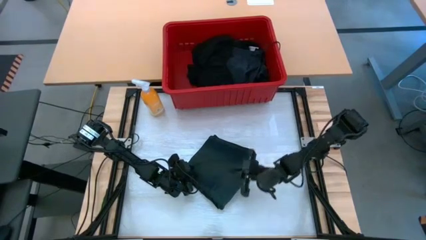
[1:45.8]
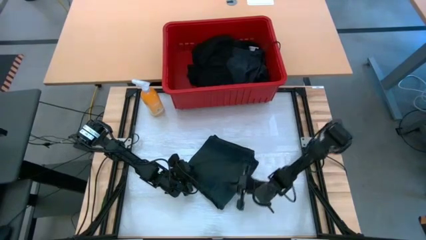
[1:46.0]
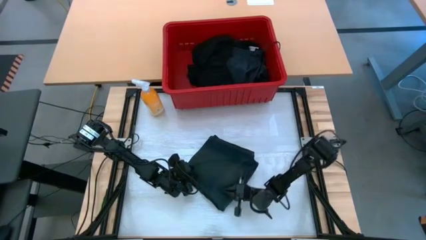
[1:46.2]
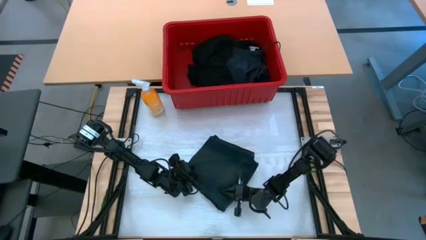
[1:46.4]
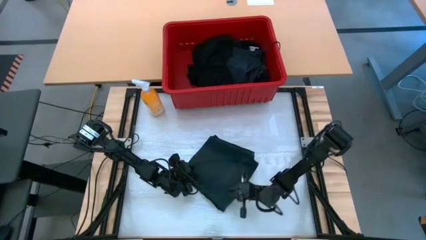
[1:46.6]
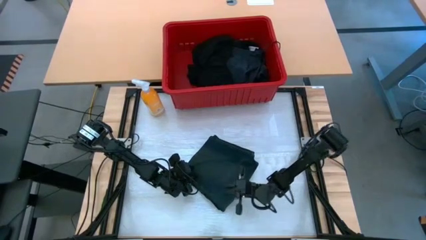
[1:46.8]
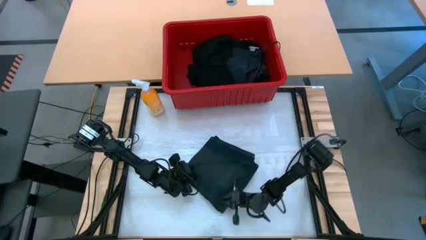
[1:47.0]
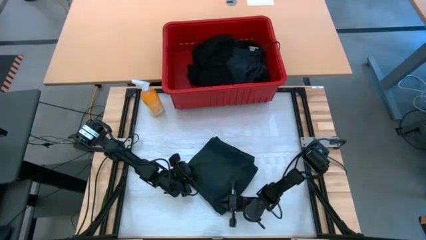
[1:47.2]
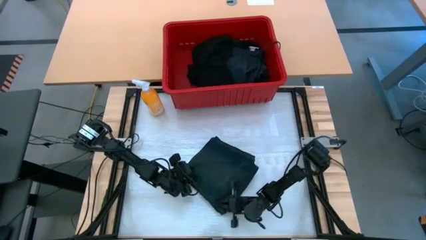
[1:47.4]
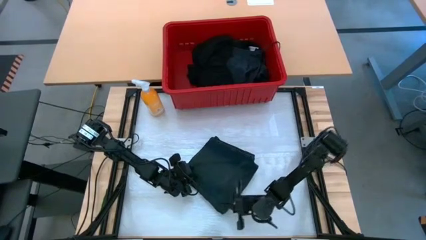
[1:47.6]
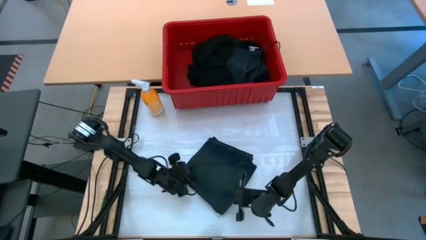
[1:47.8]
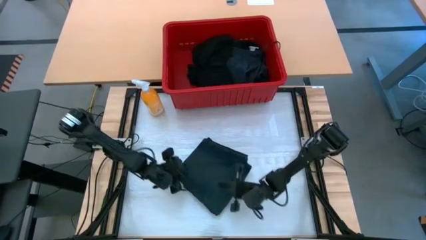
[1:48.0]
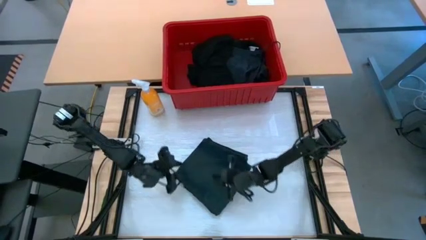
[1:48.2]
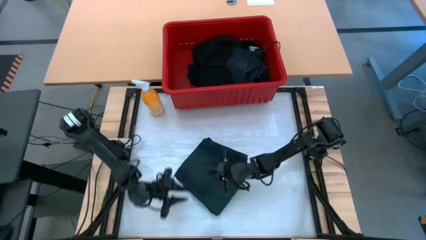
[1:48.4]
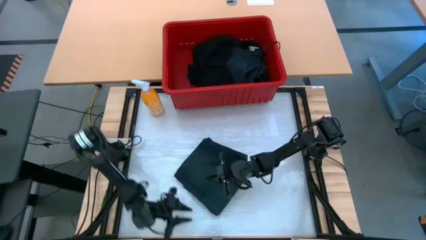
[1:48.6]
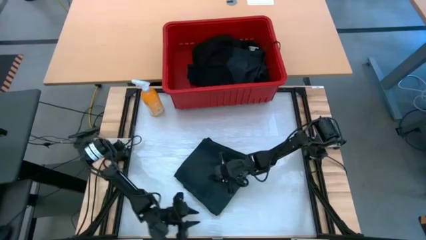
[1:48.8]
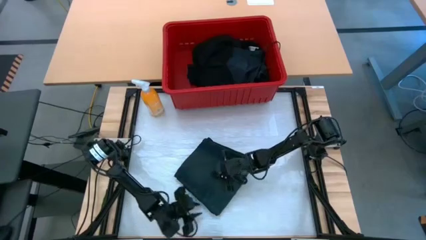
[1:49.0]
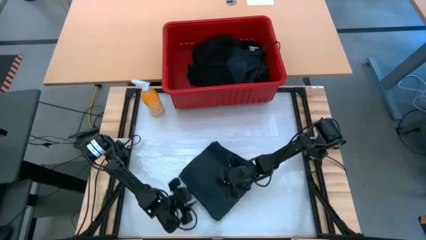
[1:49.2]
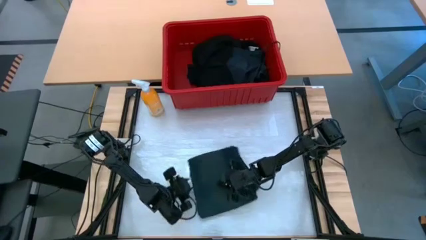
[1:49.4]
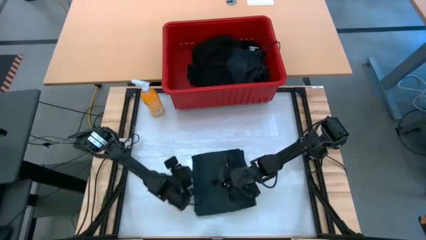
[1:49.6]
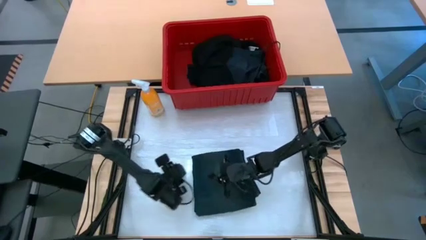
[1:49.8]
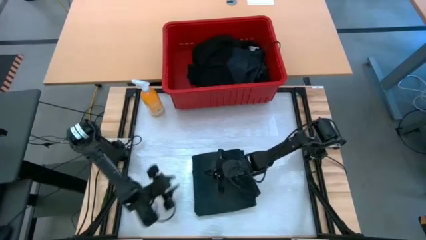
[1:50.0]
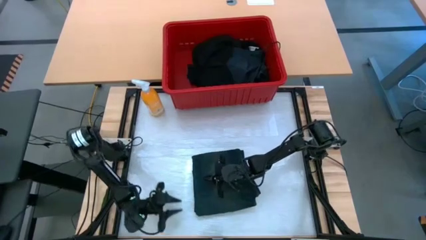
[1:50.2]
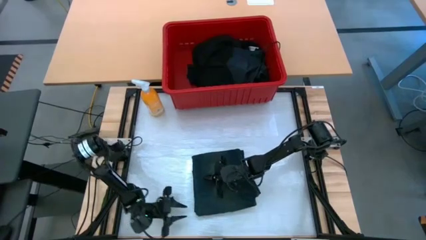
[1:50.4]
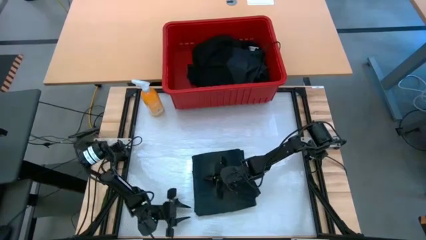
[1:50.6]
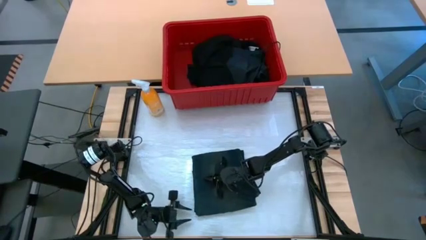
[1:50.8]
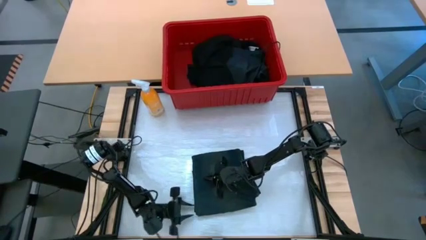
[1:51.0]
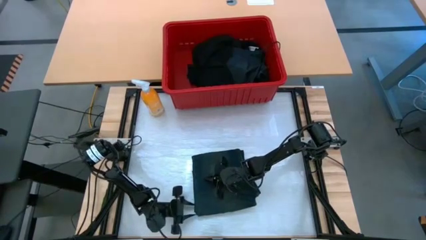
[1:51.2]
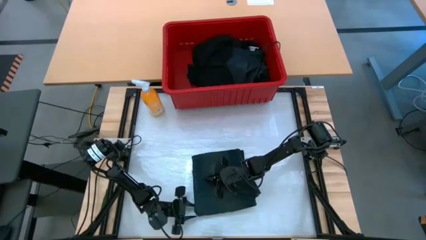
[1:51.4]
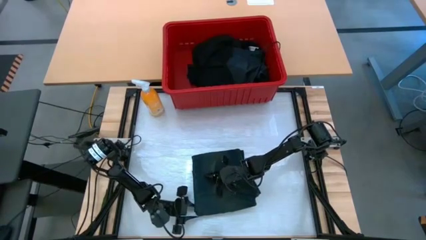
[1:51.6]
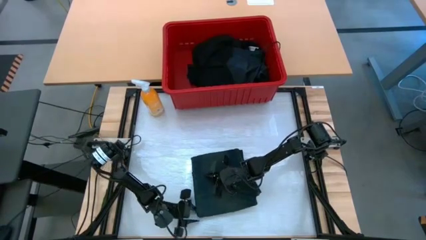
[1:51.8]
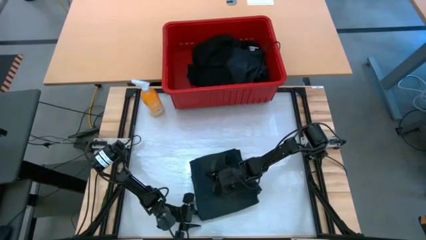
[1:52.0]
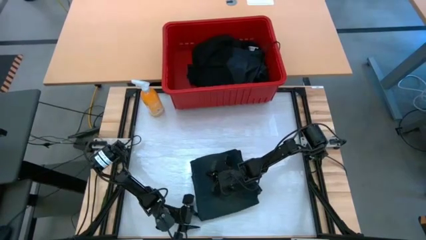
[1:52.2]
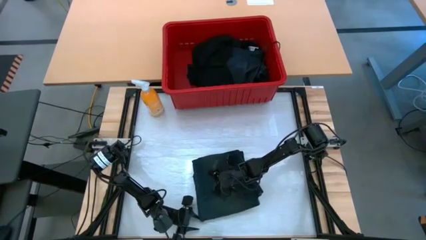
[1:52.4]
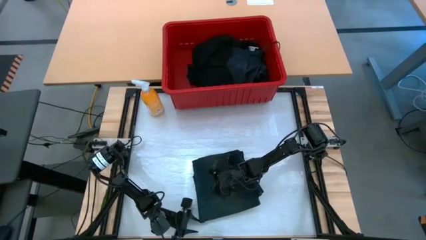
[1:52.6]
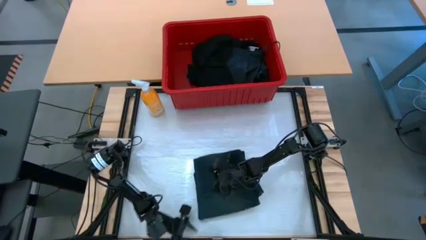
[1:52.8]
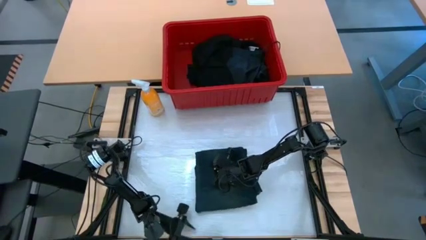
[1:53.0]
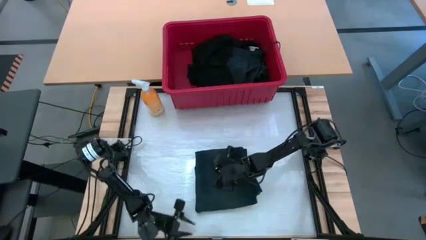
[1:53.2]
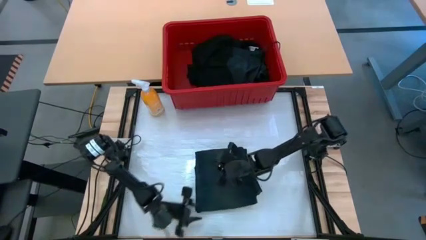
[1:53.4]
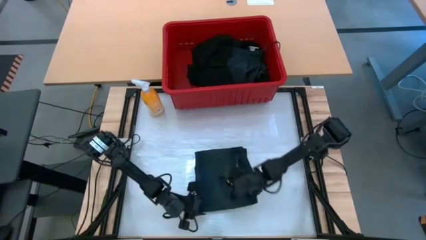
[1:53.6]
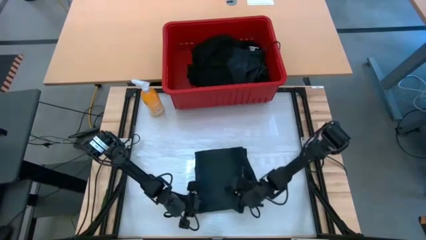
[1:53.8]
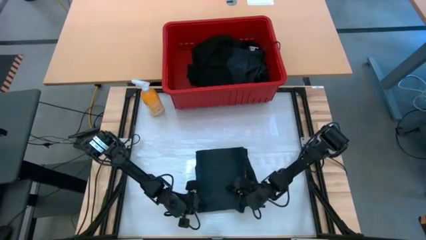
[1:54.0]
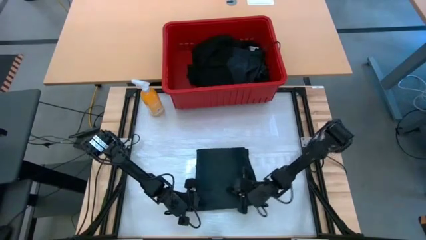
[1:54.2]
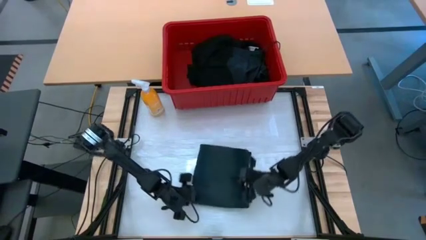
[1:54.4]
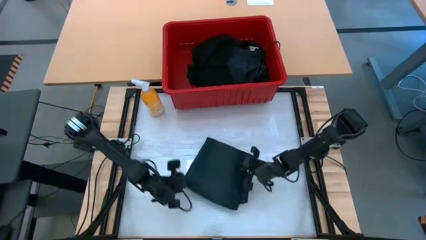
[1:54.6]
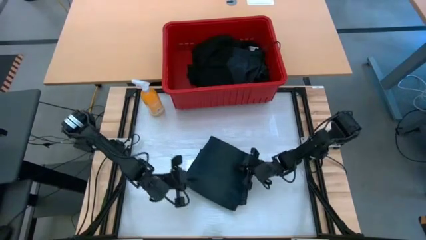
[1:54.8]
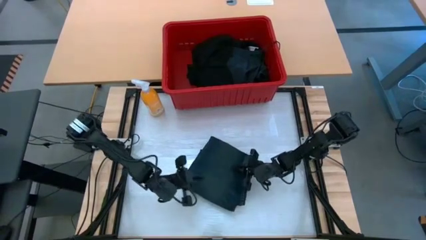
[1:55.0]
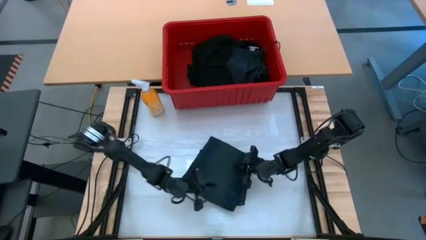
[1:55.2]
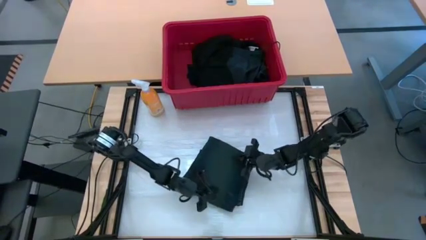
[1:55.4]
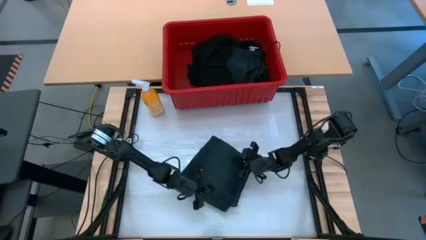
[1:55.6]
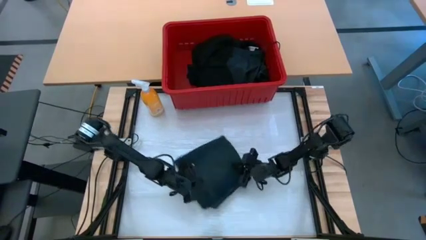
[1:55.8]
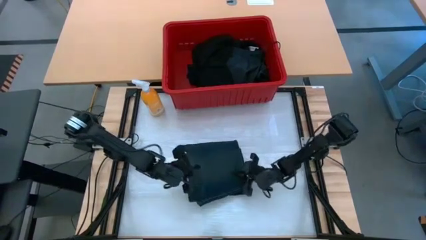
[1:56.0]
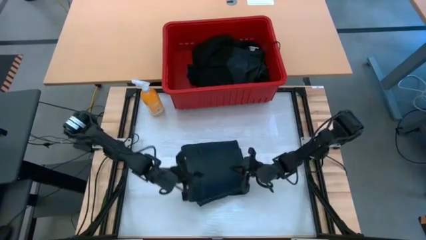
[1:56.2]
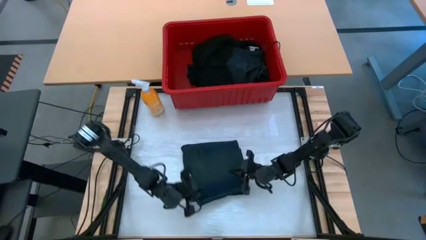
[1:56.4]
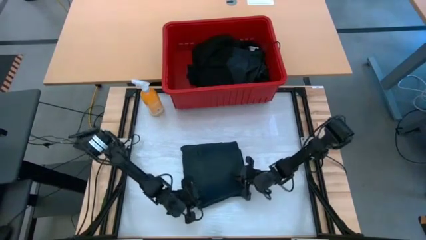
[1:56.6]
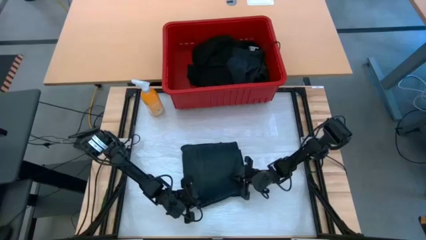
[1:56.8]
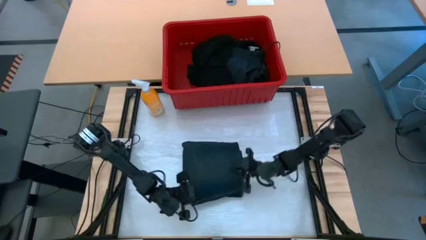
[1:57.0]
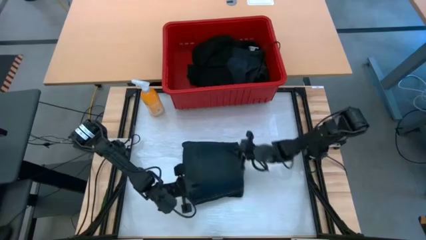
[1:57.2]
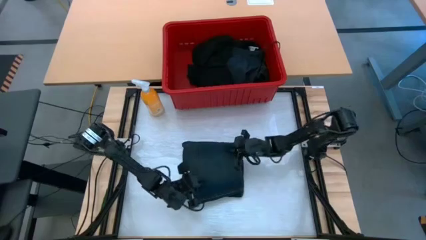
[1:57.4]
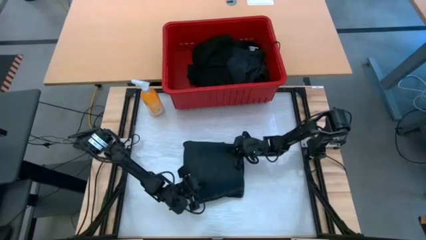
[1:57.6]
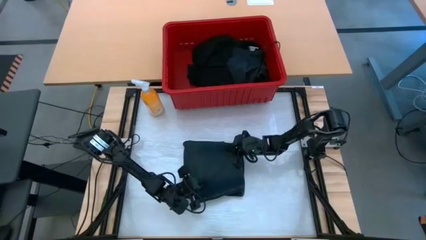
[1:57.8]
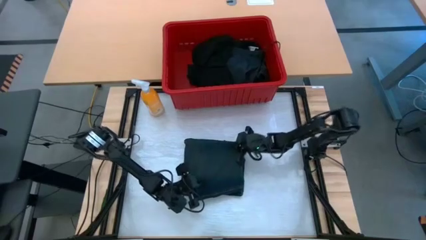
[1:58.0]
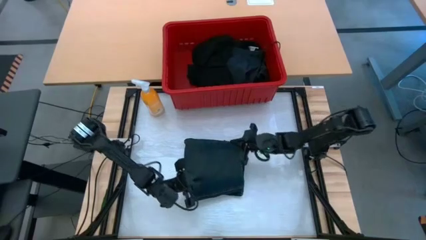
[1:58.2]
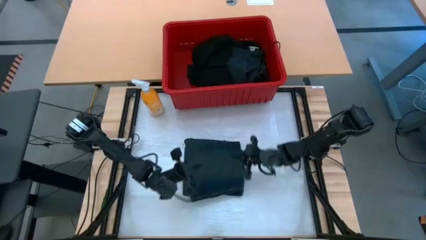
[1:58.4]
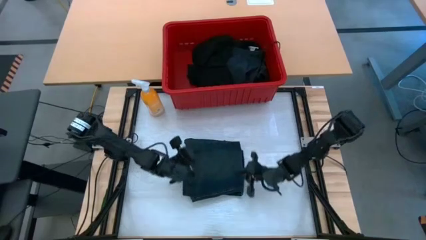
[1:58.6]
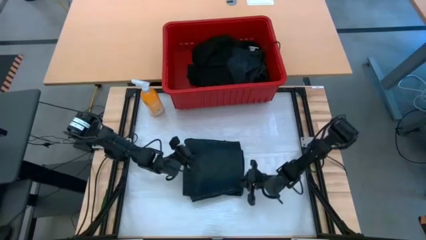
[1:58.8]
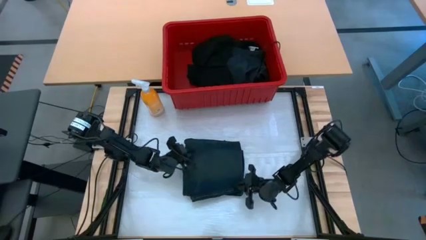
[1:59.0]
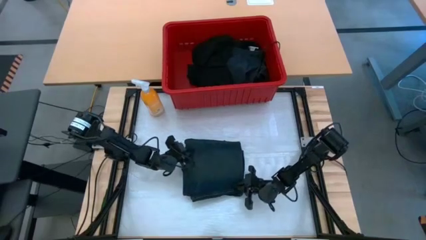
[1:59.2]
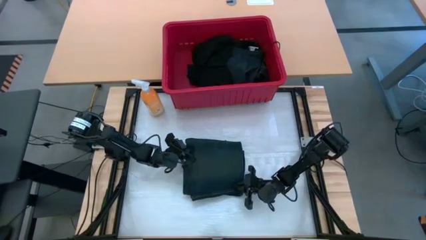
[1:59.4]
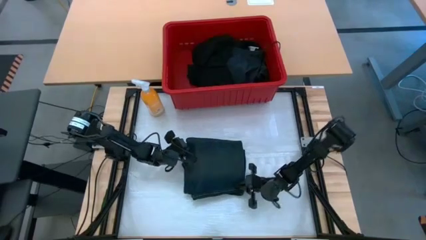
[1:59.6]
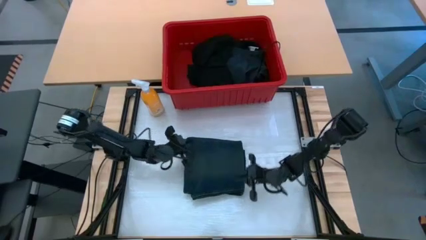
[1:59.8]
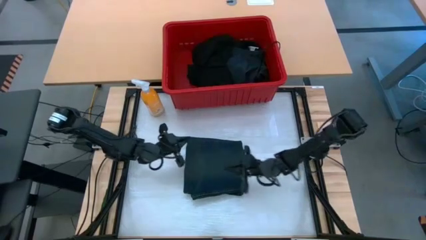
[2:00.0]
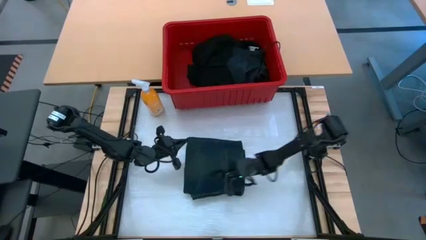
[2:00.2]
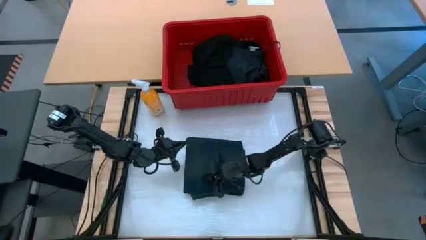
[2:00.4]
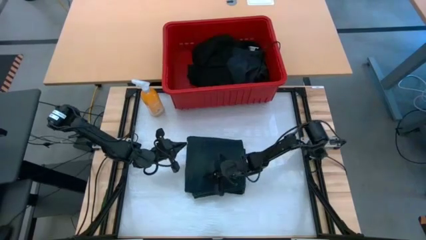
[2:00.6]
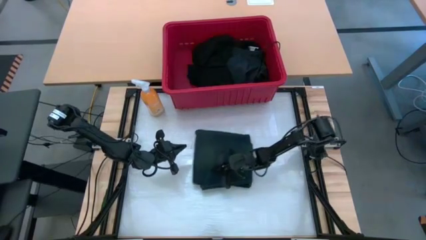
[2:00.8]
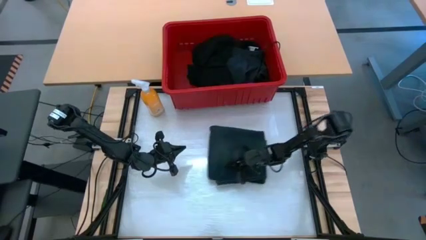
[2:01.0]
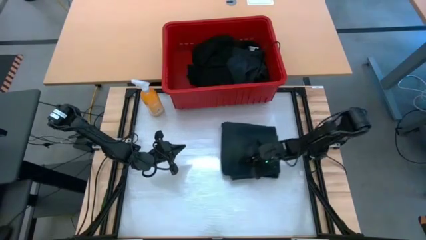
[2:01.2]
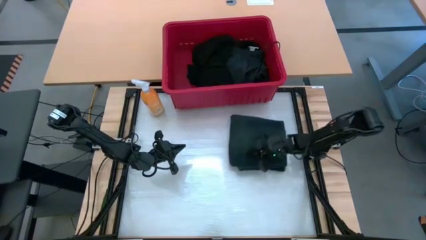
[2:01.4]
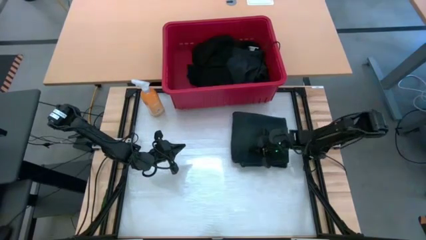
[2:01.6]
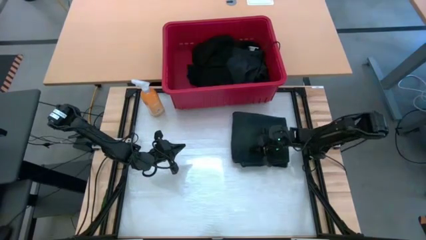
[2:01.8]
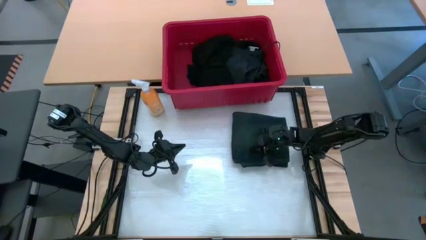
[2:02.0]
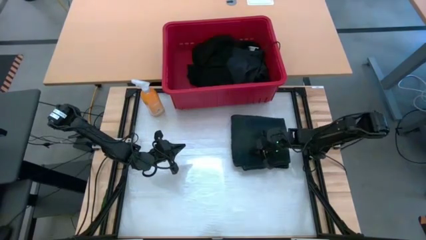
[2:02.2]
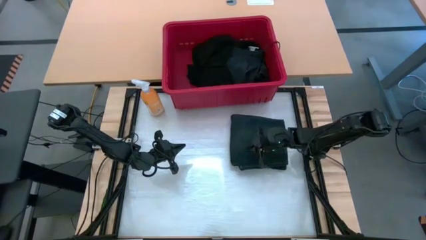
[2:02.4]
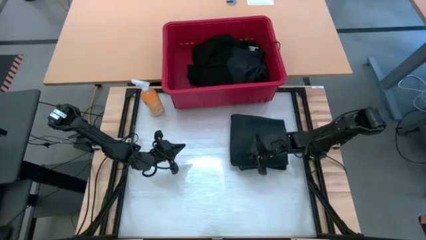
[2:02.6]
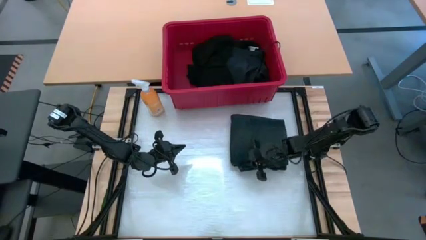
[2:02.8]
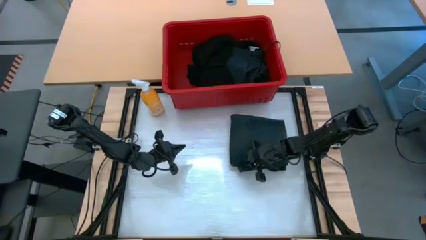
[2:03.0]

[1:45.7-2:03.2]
Task: Fold Laundry from Bin
Fold the dark blue pants
